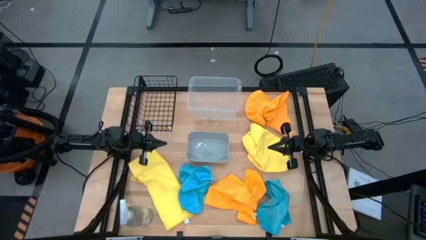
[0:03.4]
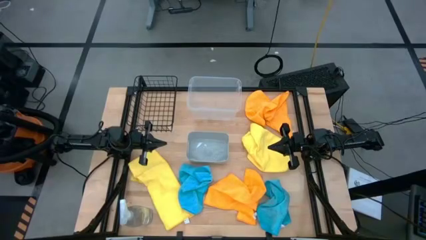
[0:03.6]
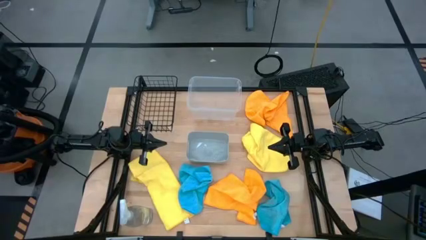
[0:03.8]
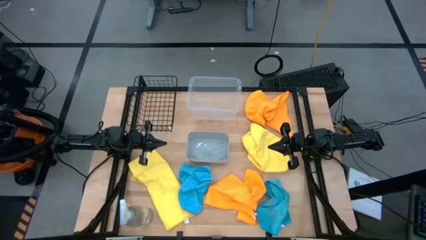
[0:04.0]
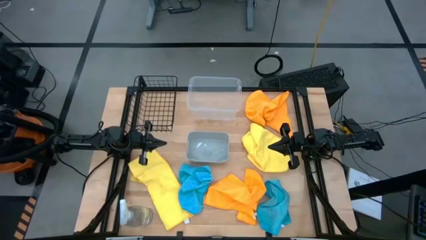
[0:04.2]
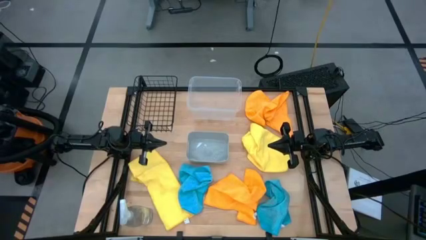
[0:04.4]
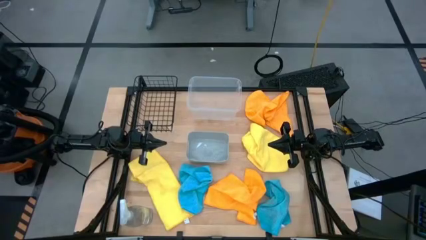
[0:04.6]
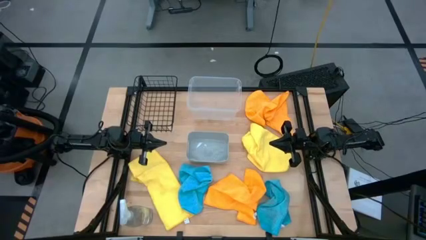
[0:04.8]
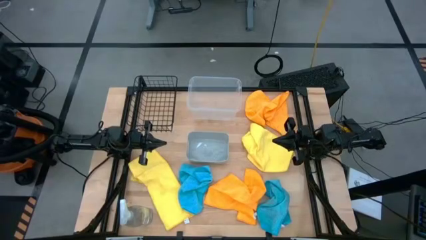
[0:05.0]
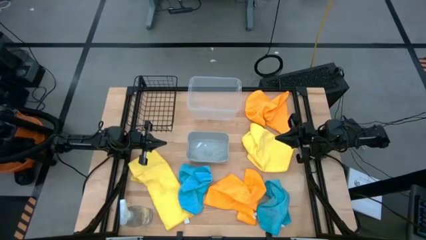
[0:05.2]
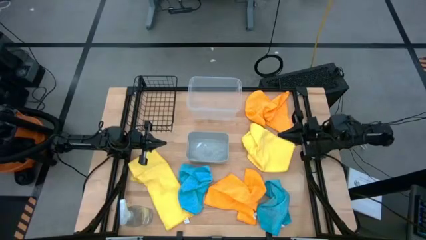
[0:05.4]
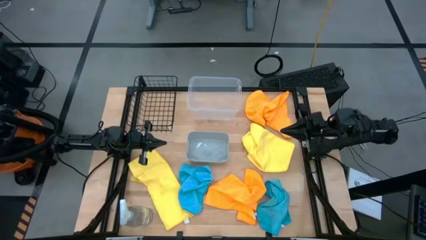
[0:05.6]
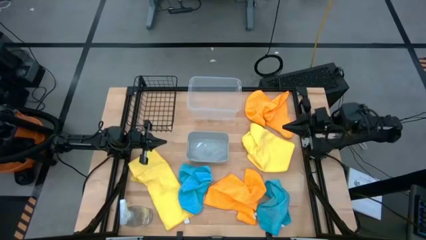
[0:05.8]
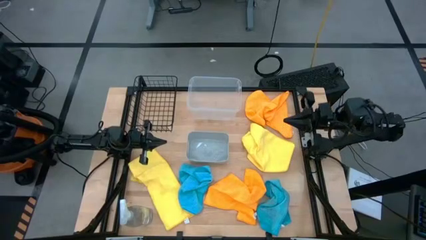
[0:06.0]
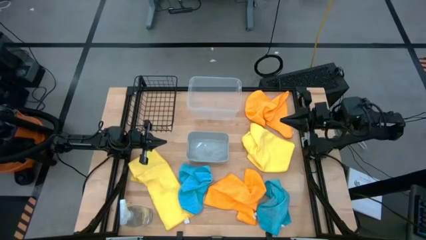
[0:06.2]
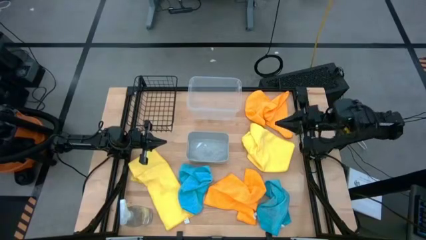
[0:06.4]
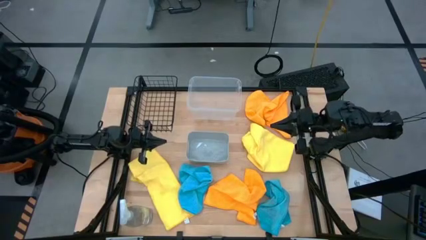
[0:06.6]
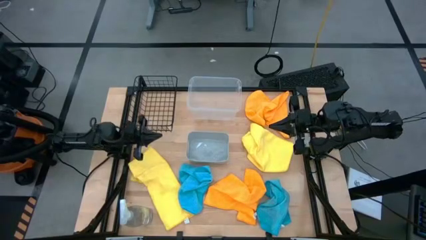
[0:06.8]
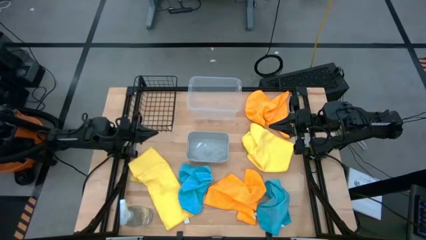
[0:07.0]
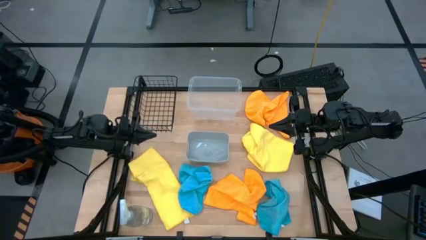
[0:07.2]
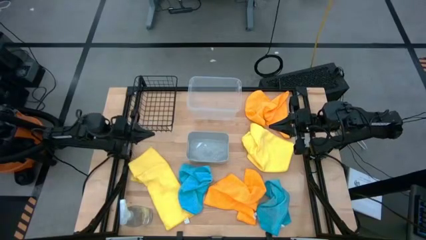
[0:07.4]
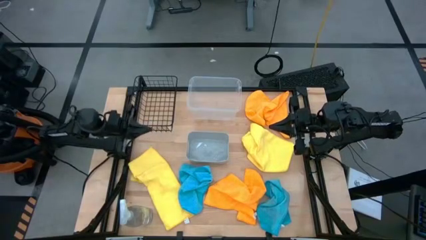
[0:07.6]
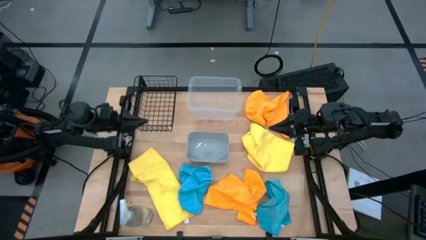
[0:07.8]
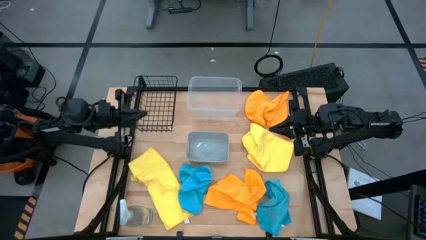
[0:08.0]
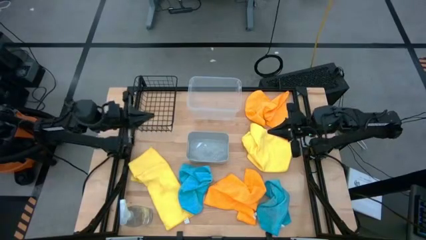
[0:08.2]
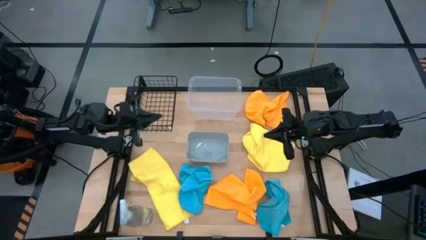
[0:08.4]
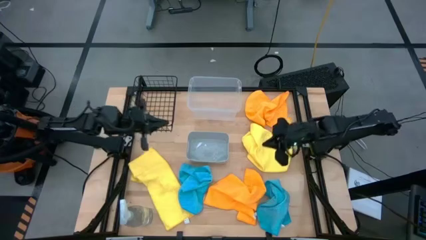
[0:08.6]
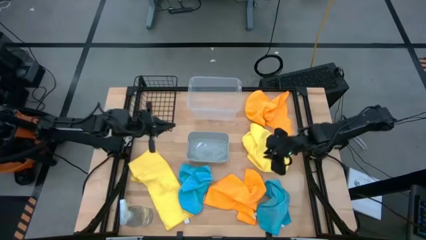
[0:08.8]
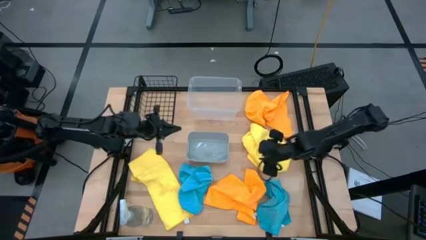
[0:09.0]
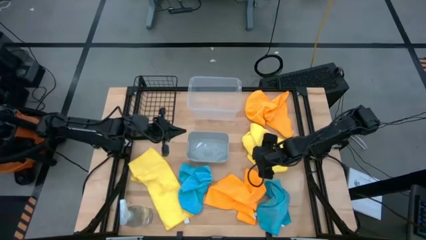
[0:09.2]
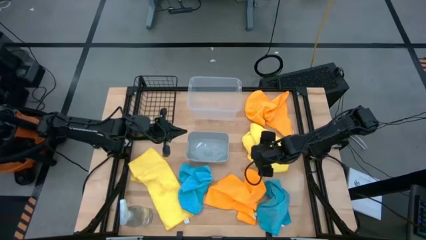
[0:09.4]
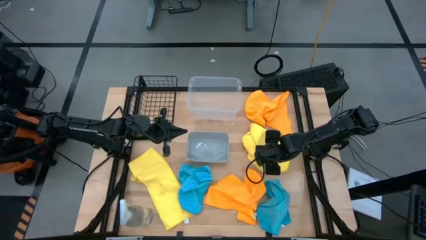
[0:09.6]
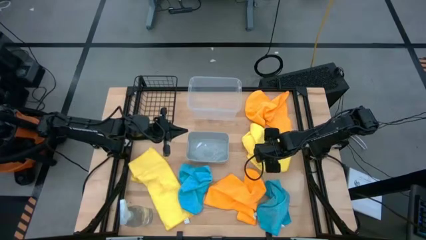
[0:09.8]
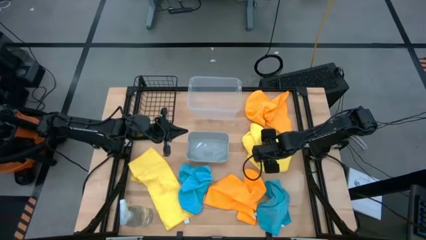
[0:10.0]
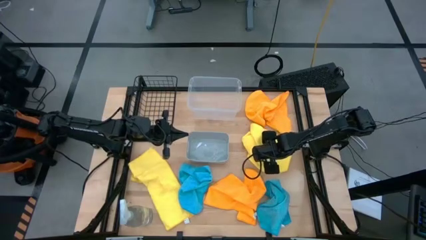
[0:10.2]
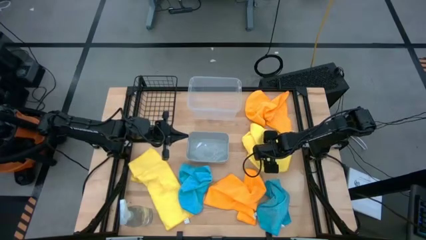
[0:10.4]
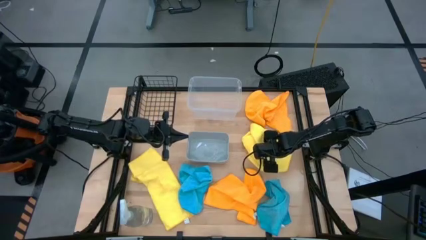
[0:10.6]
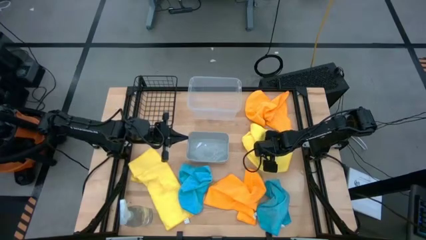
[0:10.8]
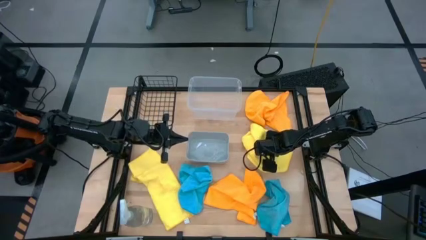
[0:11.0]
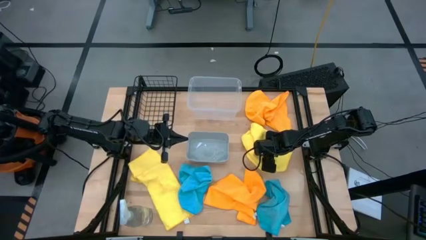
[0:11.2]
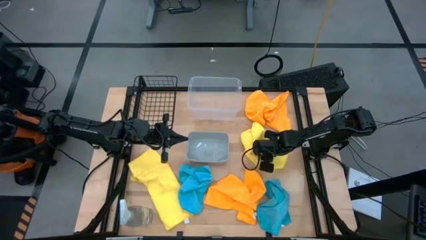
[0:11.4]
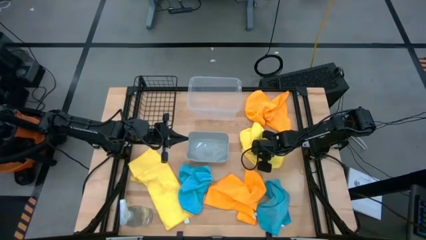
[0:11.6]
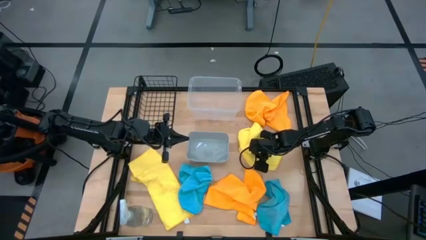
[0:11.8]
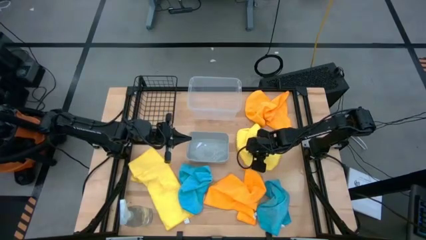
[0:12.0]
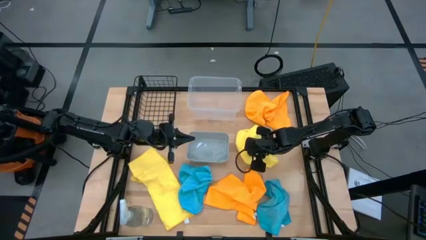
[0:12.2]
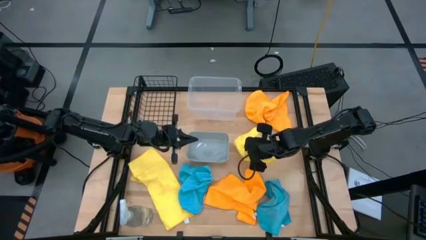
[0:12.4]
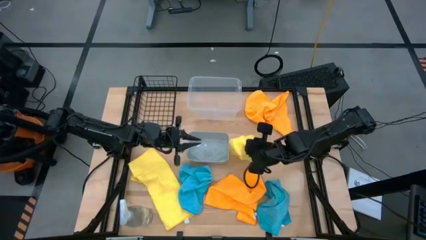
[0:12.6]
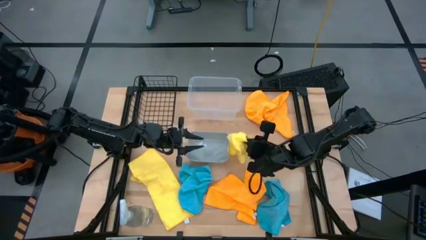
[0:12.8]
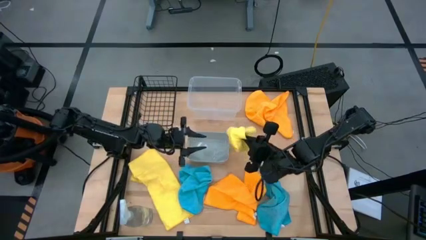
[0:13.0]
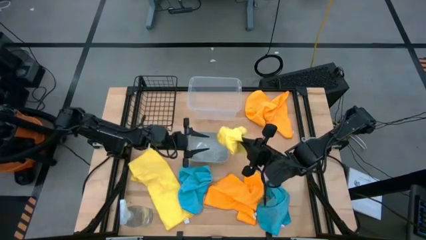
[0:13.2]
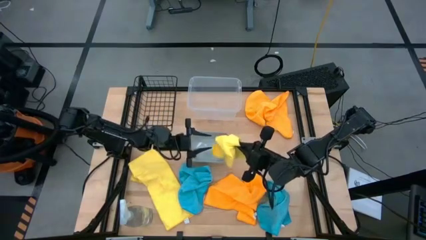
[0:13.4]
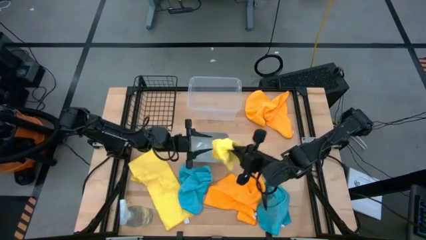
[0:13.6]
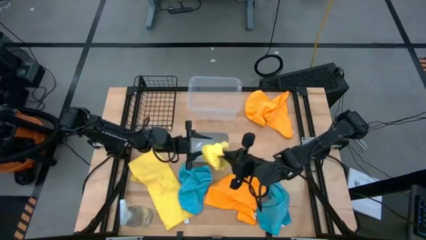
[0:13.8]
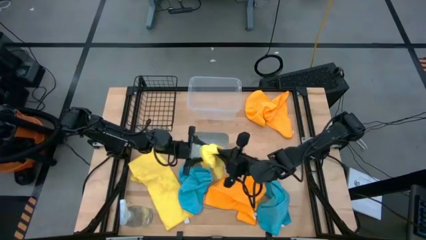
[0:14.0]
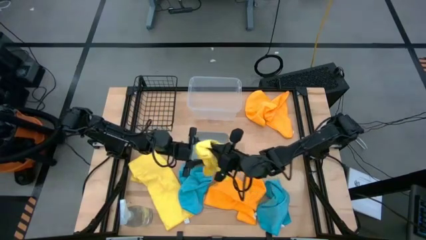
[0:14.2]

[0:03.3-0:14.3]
Task: Sort microfiber towel by color & place in baskets
Put the right yellow microfiber cloth into the transparent bin
